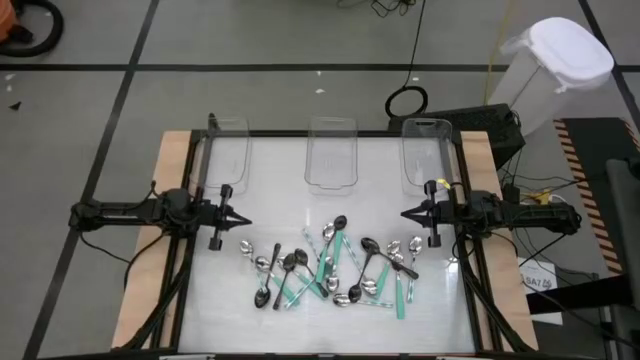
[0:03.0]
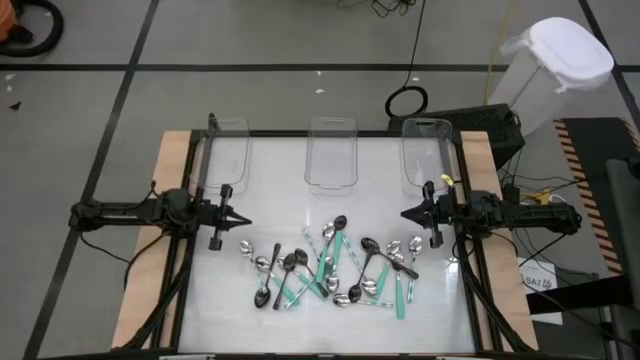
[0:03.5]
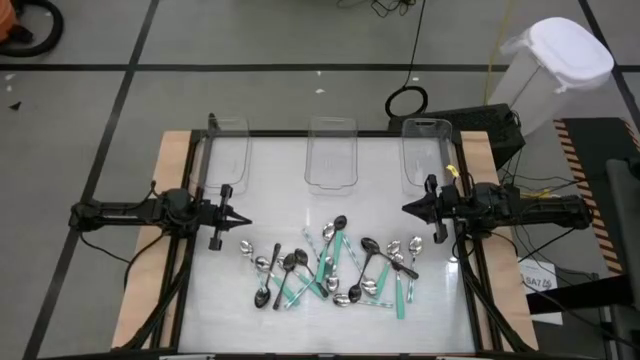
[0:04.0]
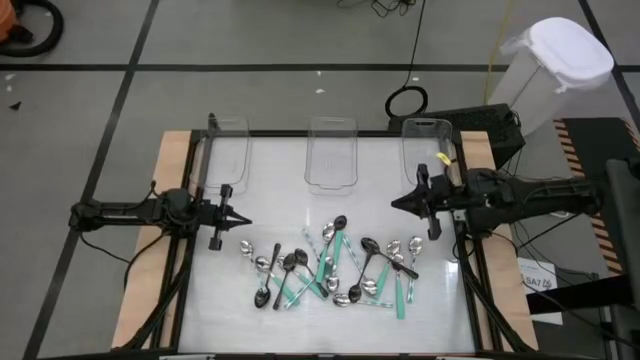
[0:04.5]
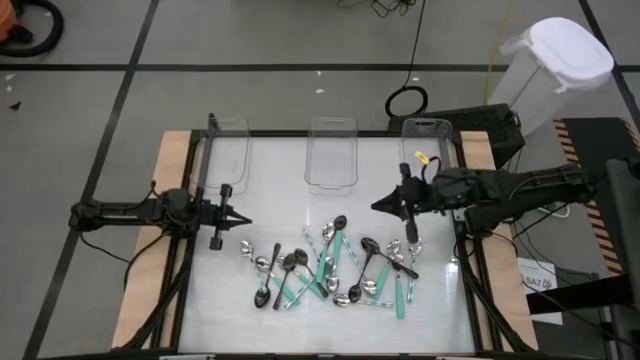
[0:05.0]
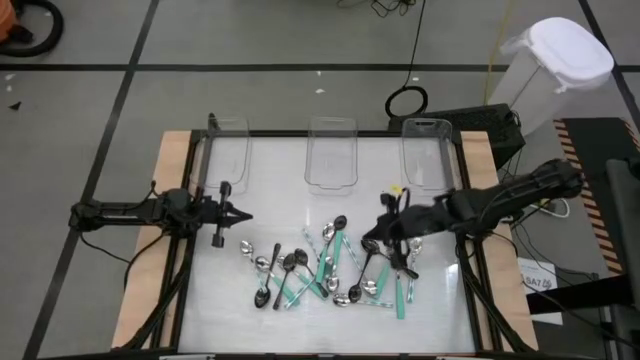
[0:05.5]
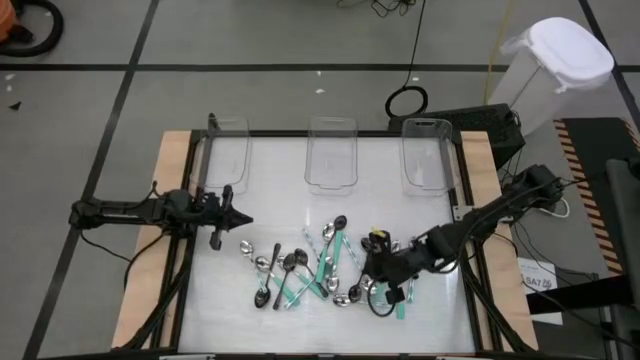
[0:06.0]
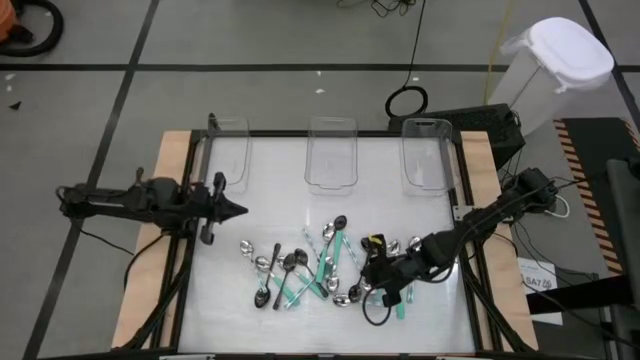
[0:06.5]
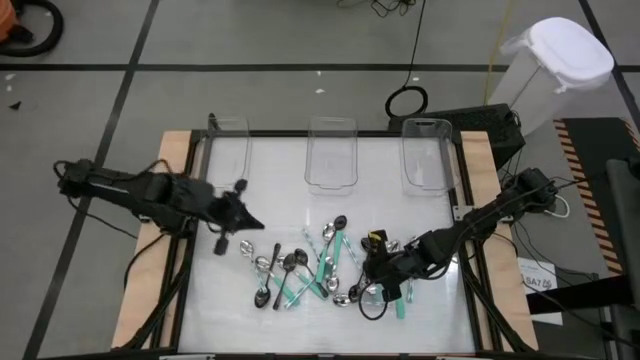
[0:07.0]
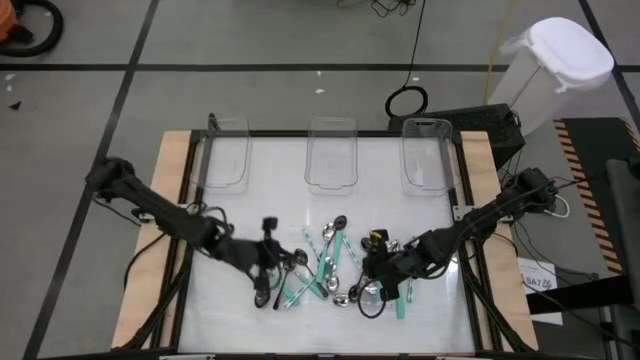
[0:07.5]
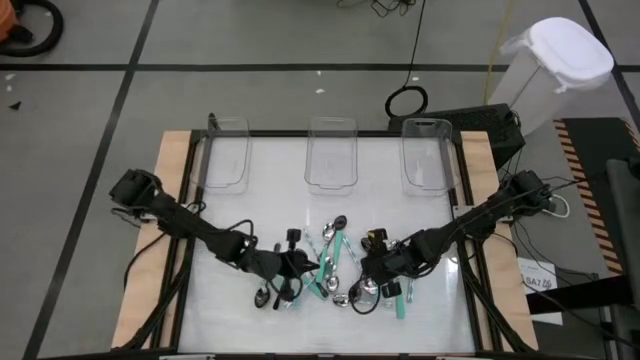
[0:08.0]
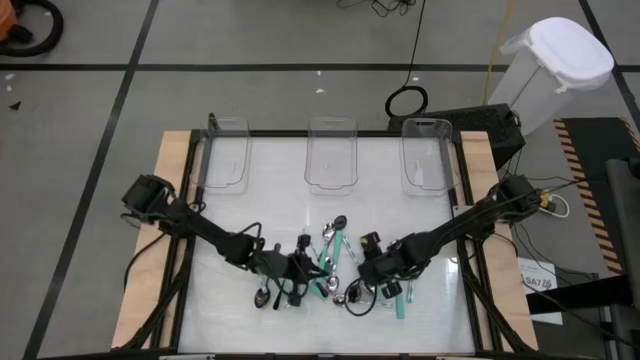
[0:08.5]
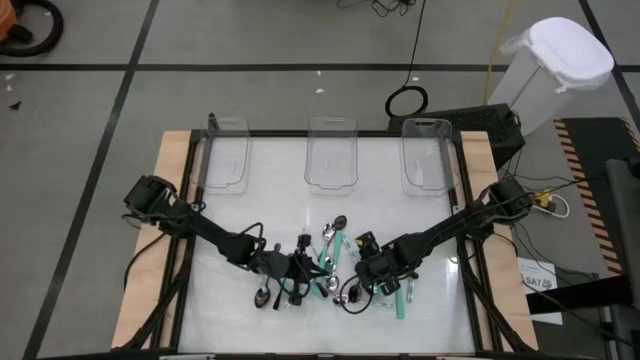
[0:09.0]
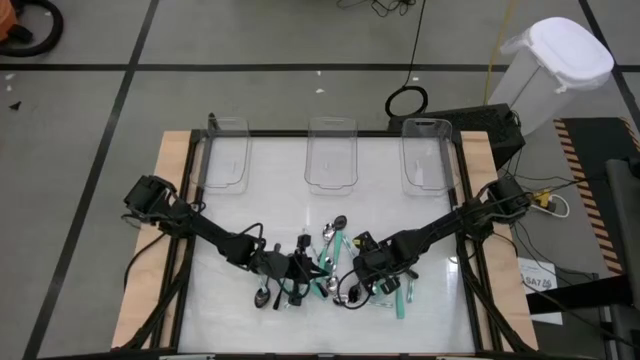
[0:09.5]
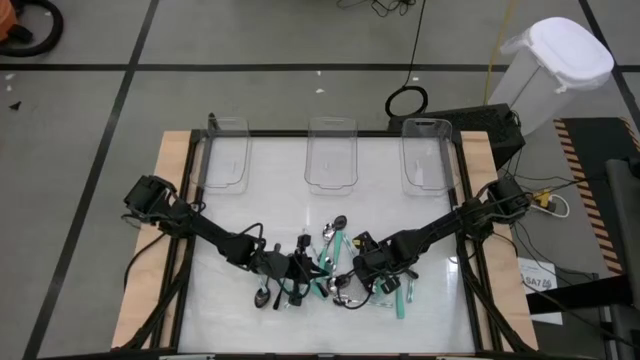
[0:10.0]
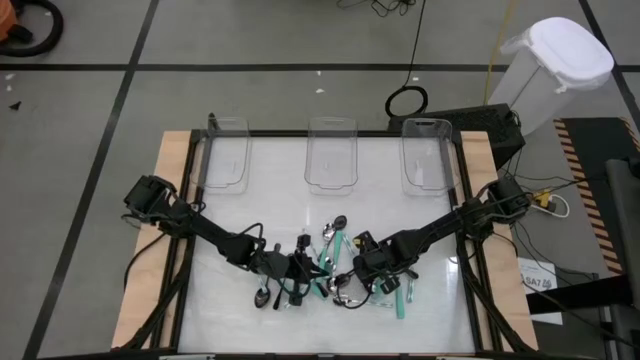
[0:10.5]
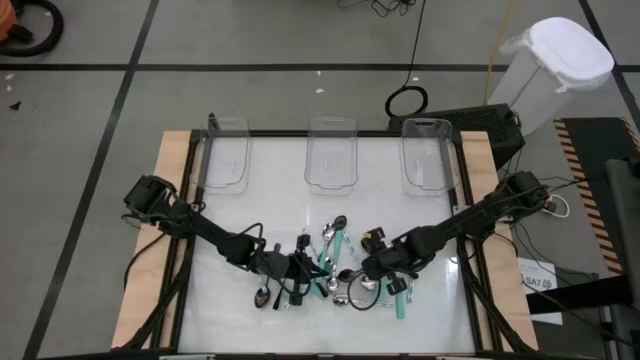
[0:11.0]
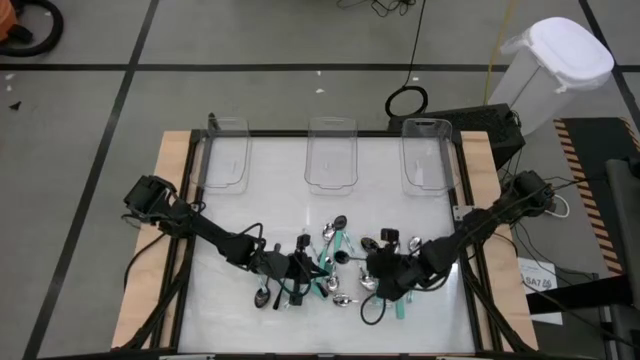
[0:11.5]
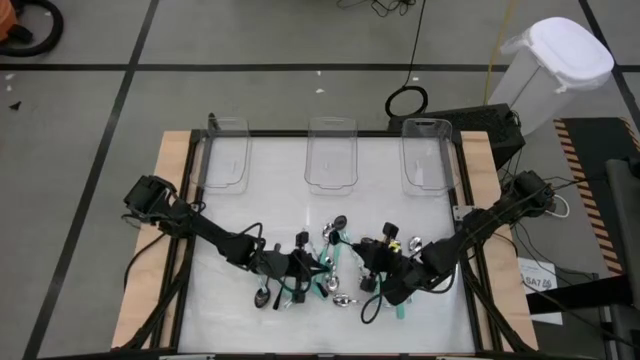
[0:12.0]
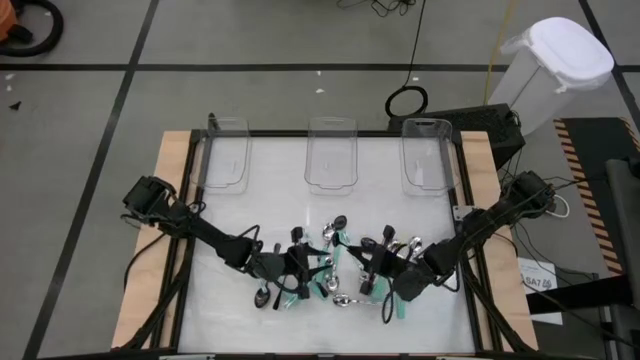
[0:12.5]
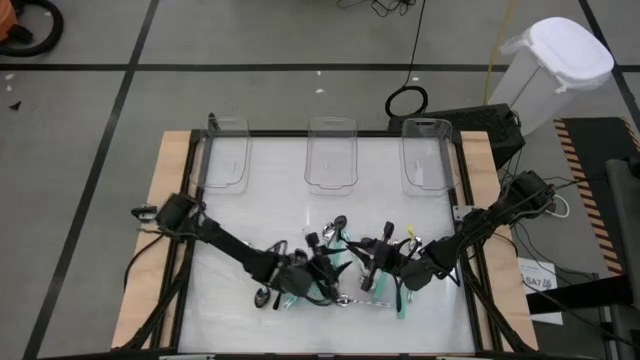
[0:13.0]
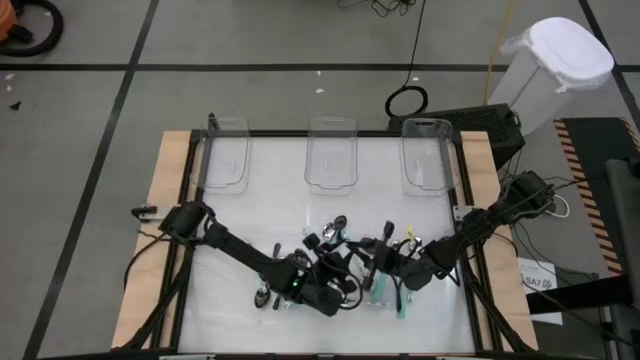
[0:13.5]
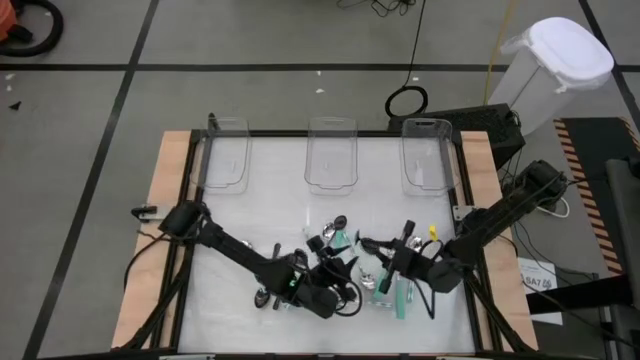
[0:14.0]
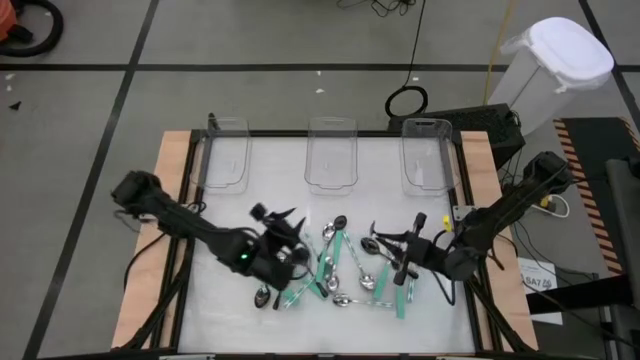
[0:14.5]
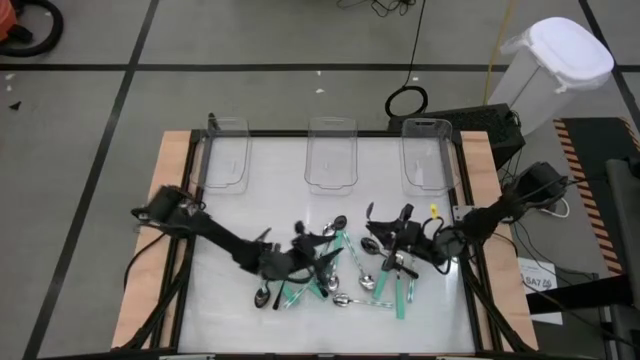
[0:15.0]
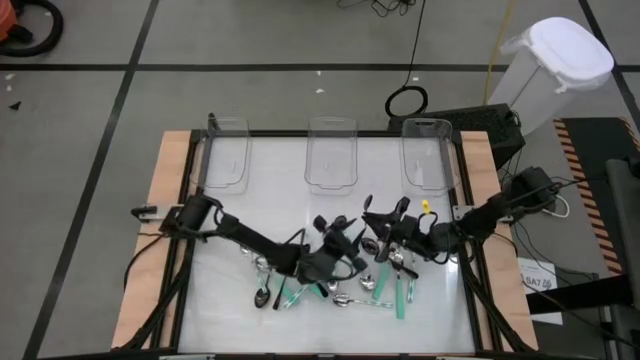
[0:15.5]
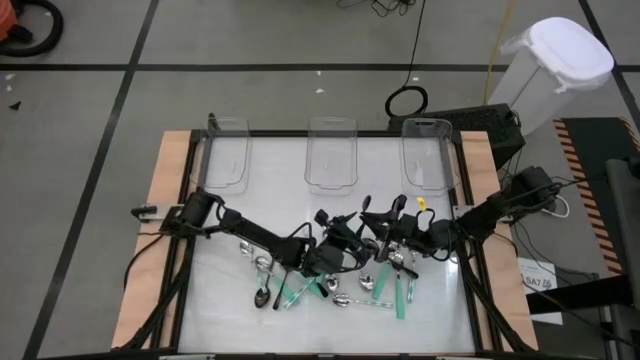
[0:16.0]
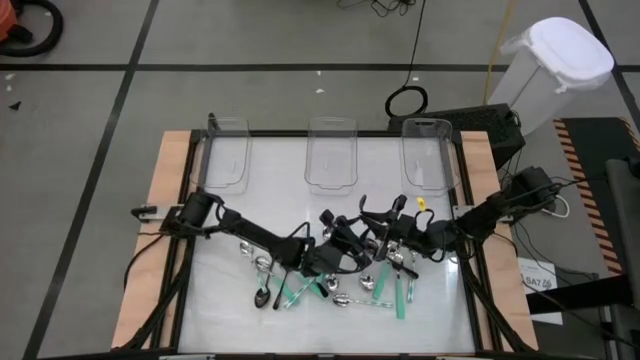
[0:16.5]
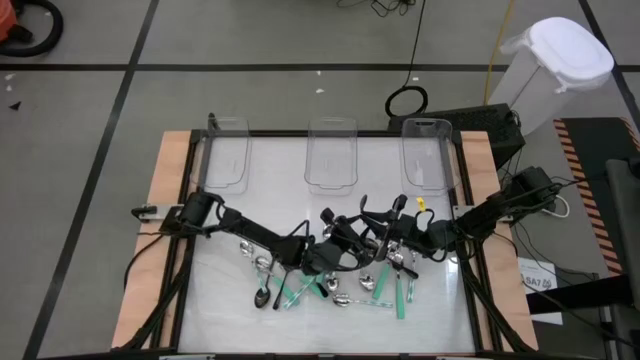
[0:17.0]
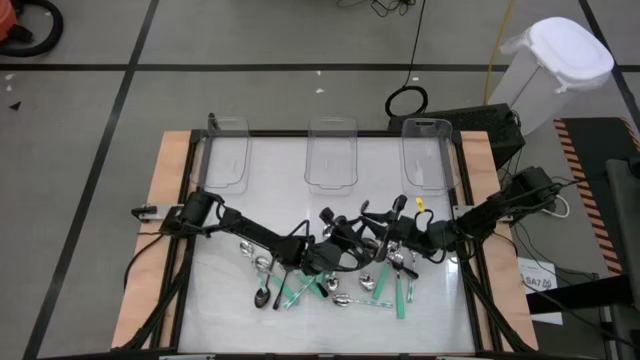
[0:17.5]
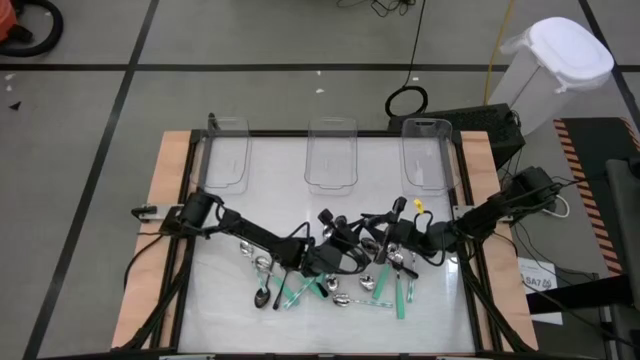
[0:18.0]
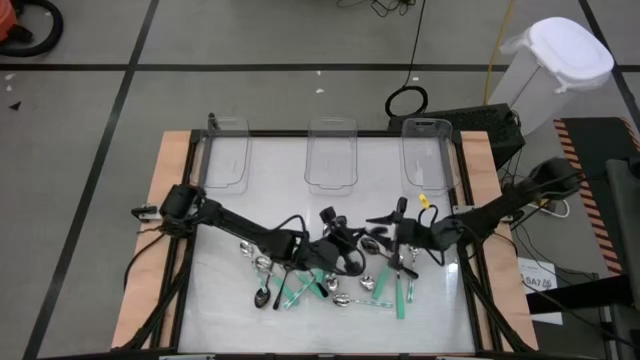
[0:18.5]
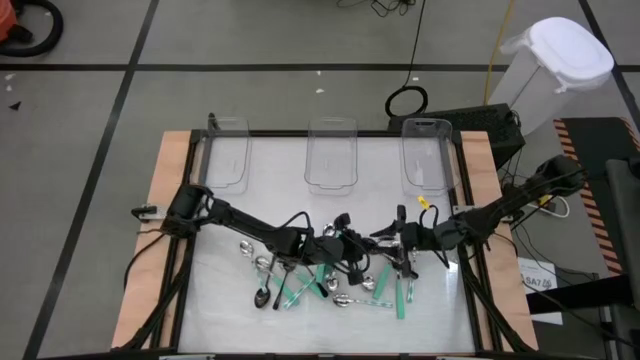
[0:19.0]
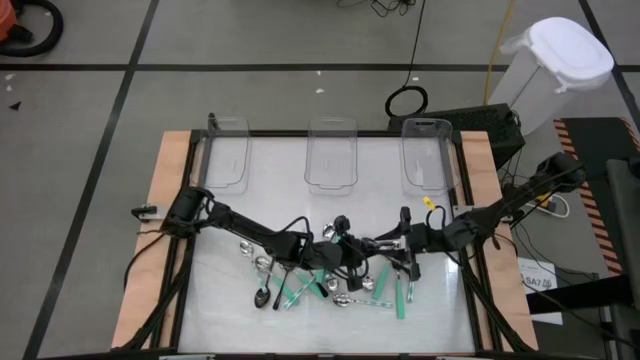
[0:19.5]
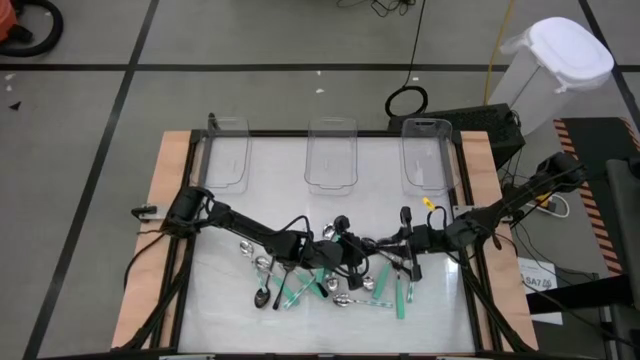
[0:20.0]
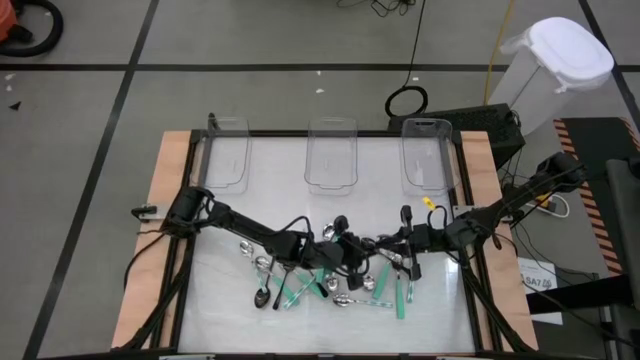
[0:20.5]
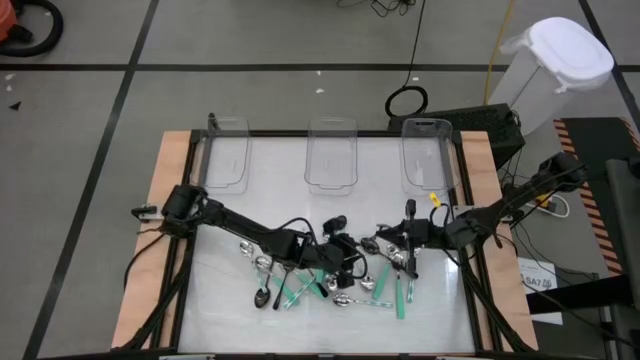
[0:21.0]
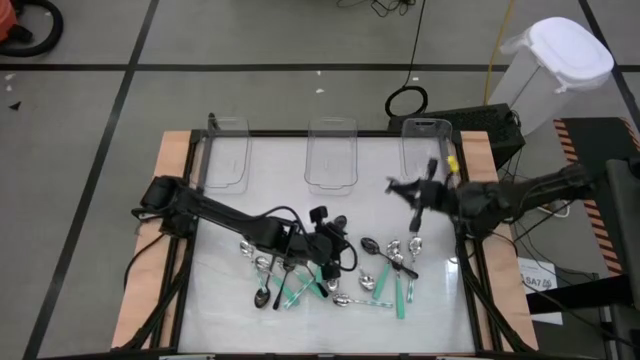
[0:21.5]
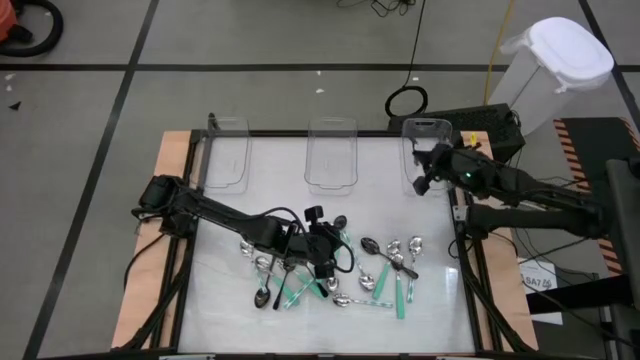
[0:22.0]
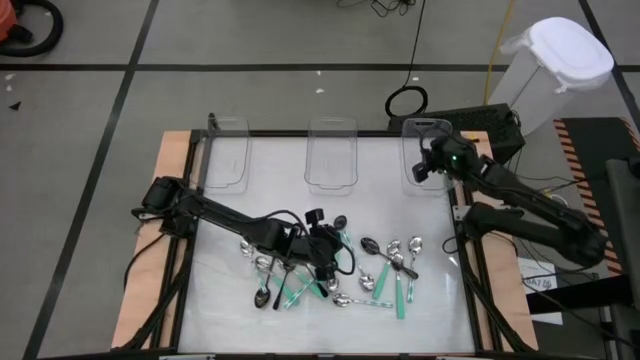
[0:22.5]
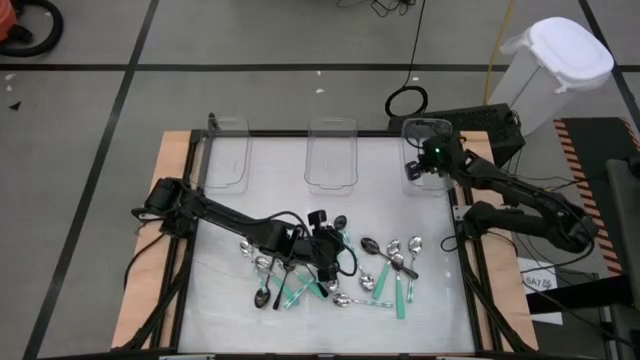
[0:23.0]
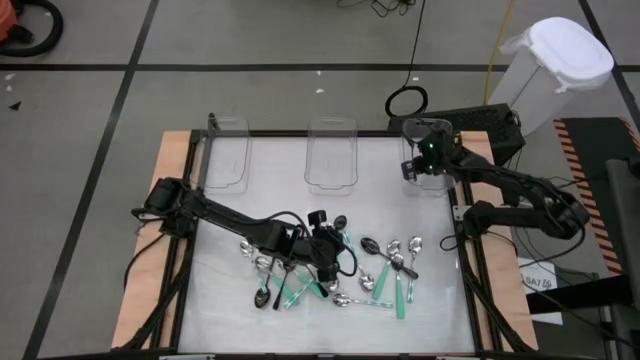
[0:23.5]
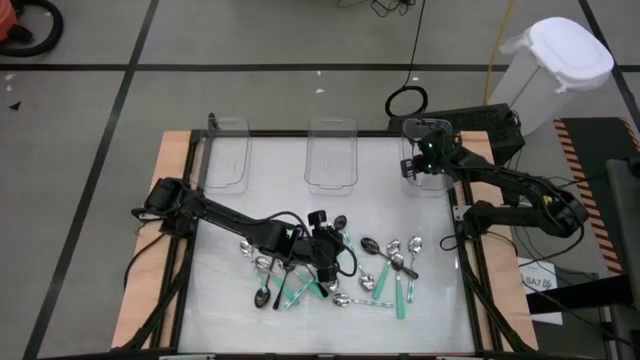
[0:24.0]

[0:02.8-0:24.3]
Task: Sort silverware by color (type)
Put the black spoon into the right transparent bin
